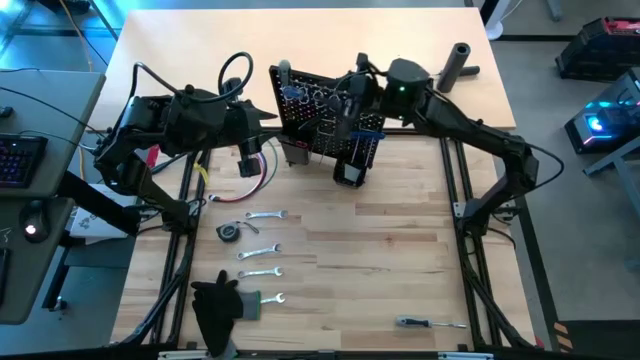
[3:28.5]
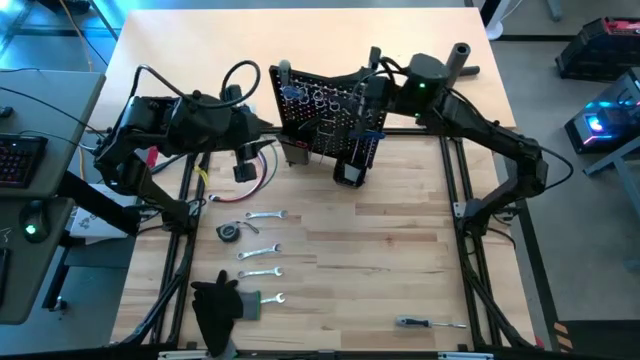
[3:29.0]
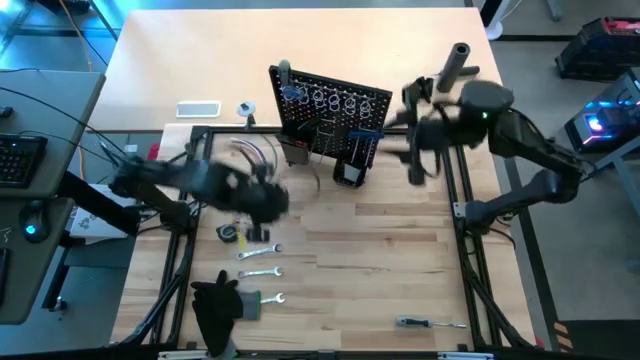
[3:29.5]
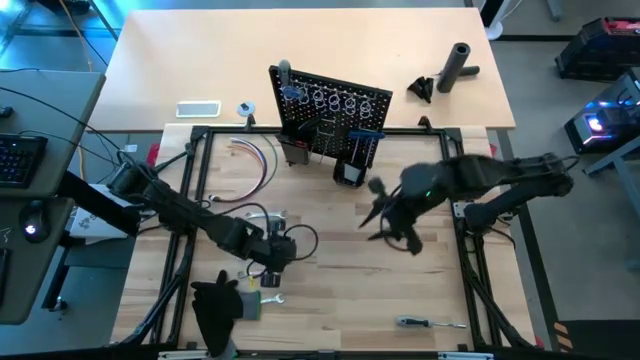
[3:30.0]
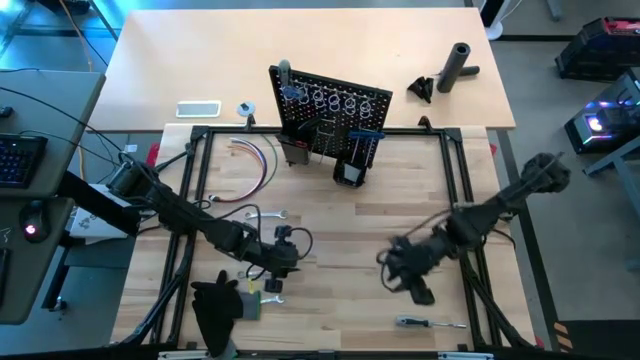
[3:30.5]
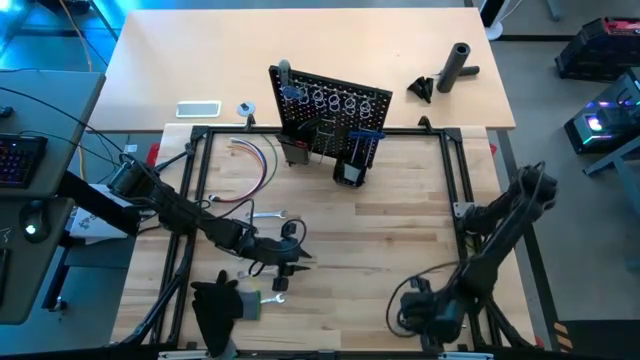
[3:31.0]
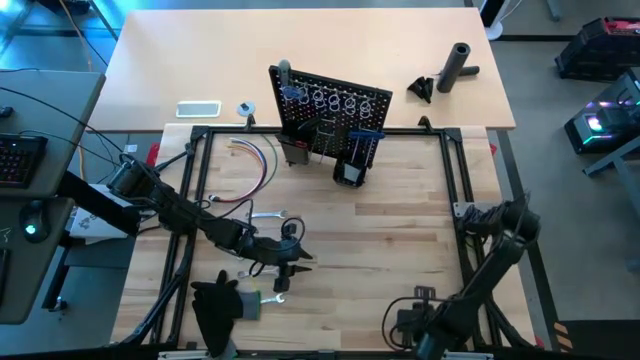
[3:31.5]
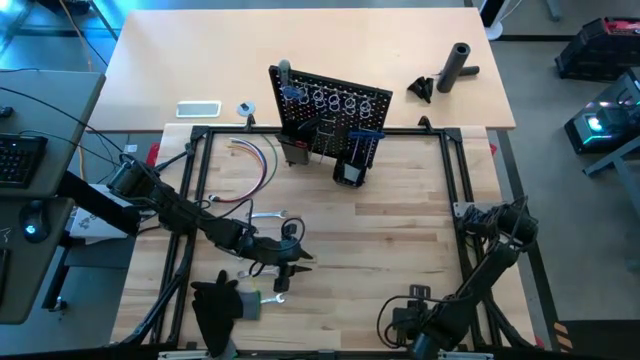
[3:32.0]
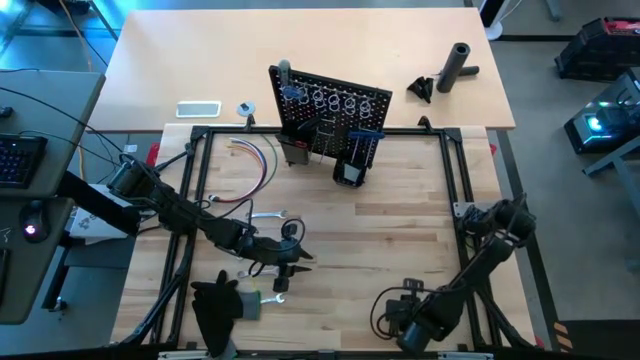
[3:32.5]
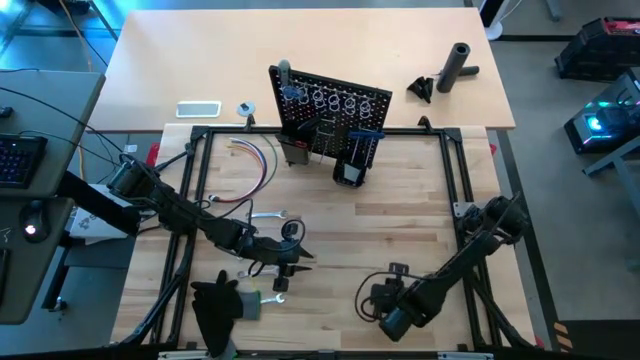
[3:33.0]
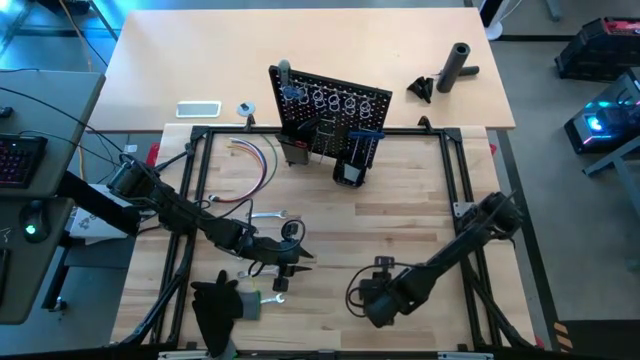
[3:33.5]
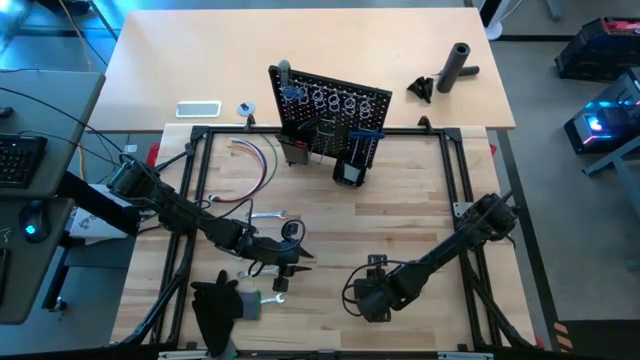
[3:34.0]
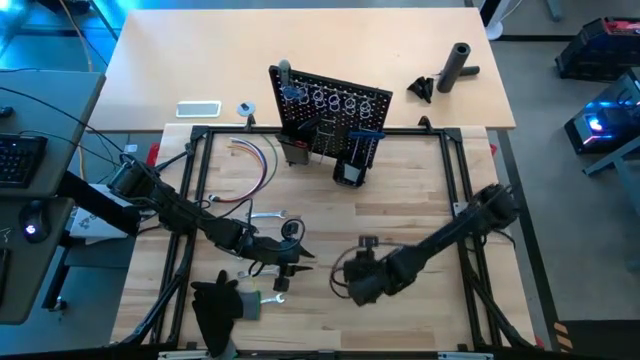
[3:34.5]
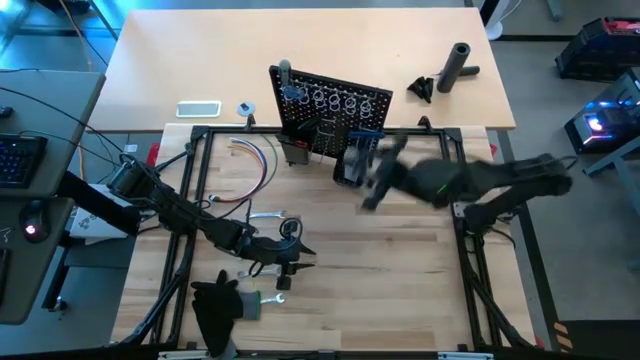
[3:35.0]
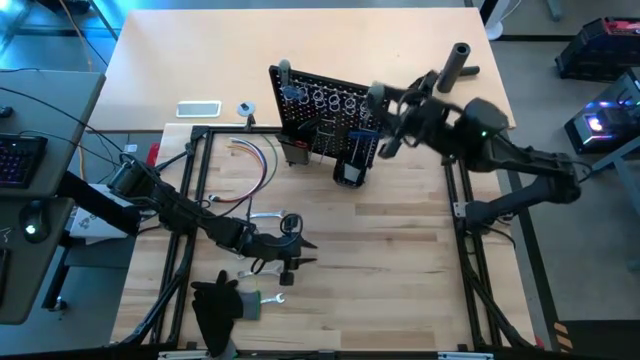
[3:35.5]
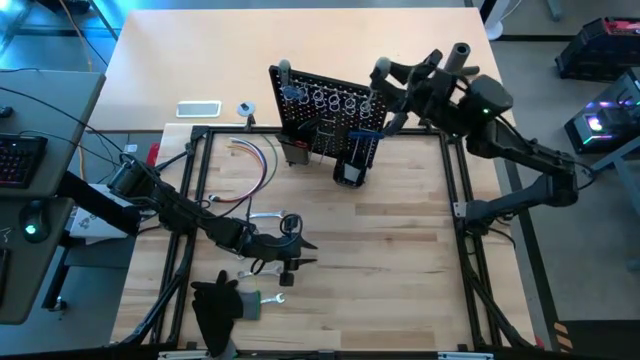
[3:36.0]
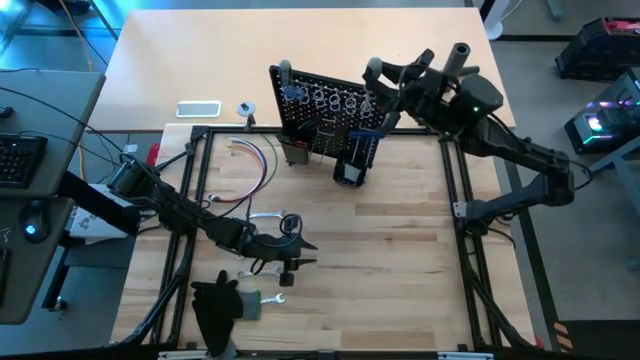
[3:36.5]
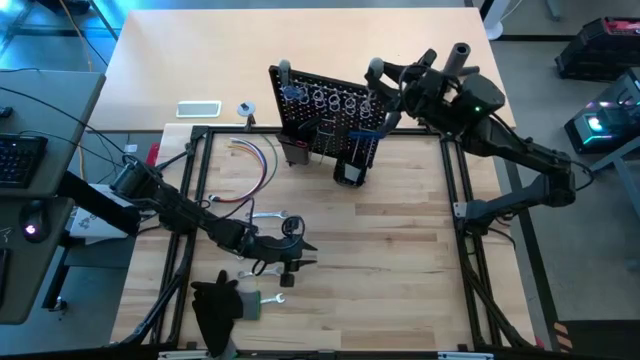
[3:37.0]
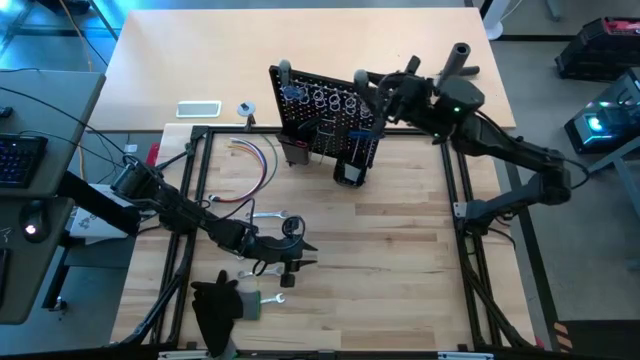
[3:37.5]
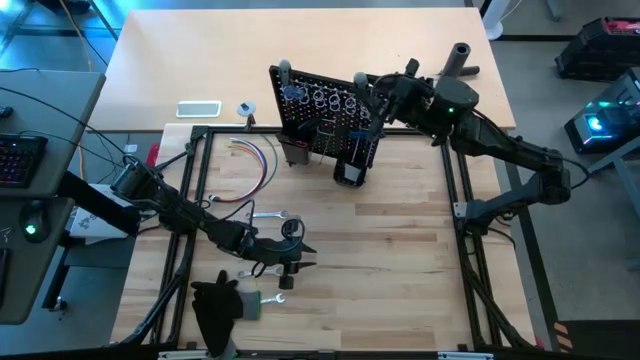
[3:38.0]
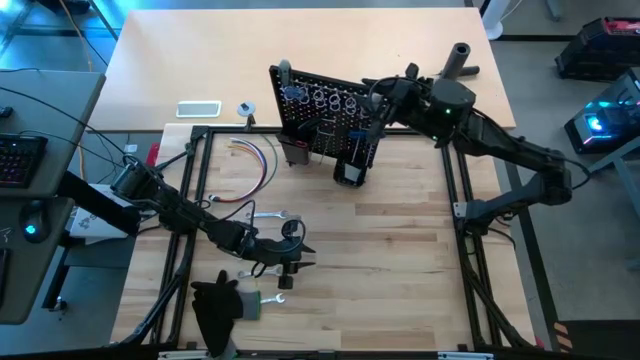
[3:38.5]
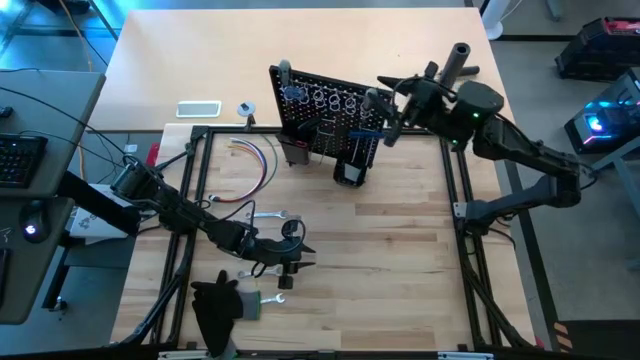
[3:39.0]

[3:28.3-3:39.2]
Task: Hang tools onto peg board
Hang the gray screwdriver on the black pegboard

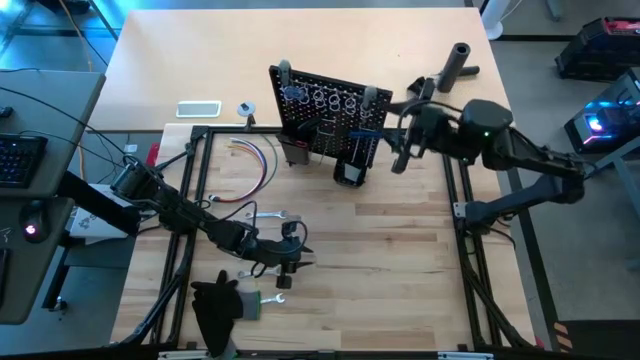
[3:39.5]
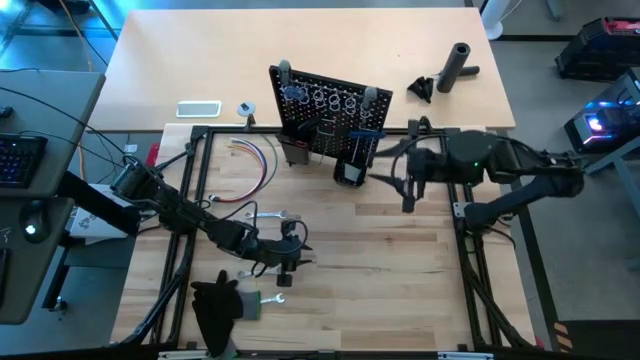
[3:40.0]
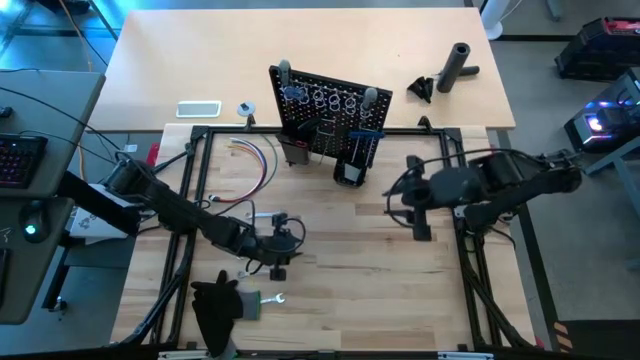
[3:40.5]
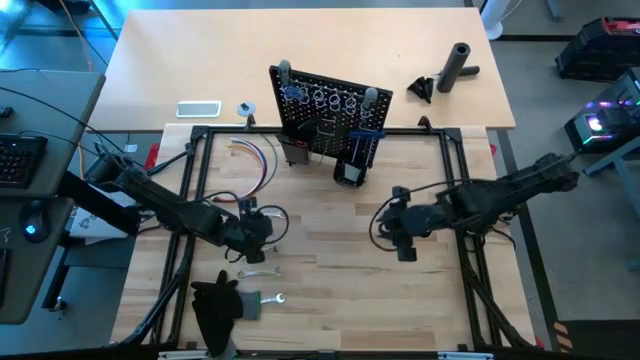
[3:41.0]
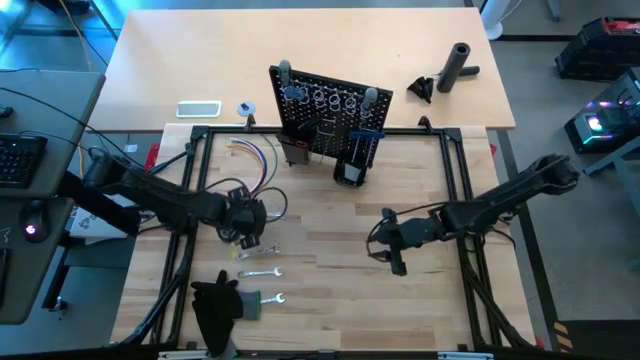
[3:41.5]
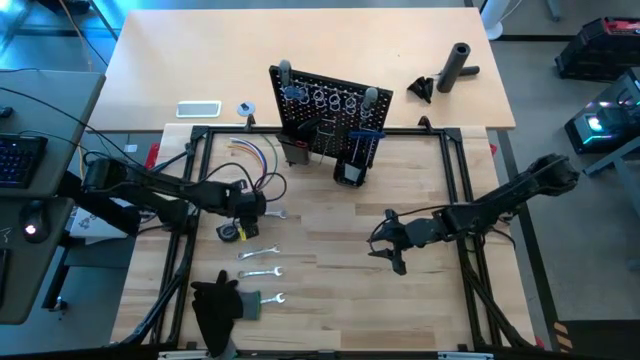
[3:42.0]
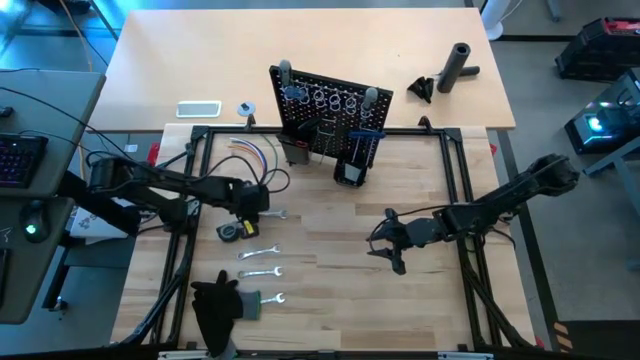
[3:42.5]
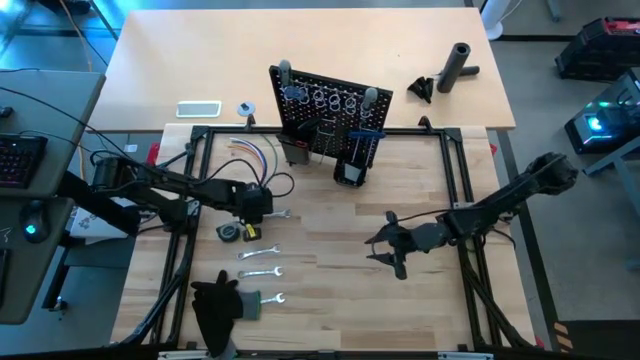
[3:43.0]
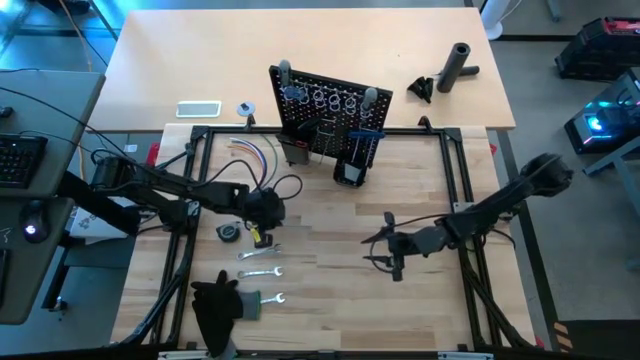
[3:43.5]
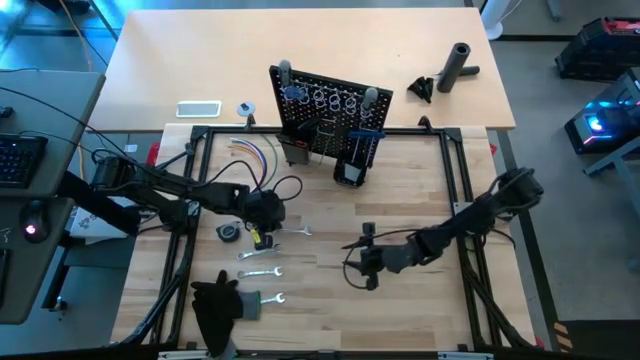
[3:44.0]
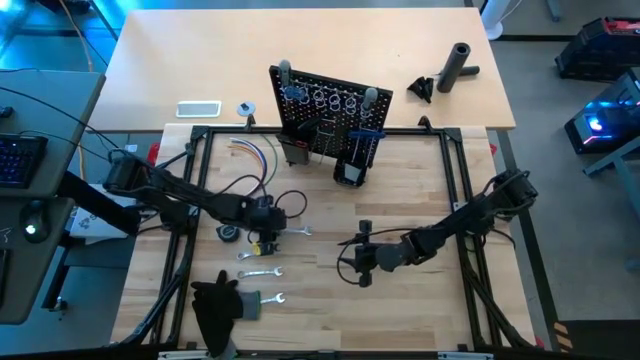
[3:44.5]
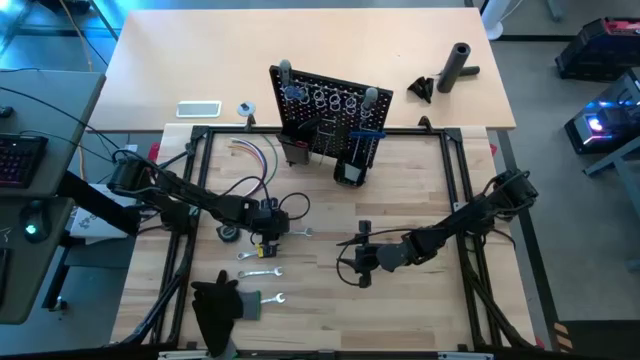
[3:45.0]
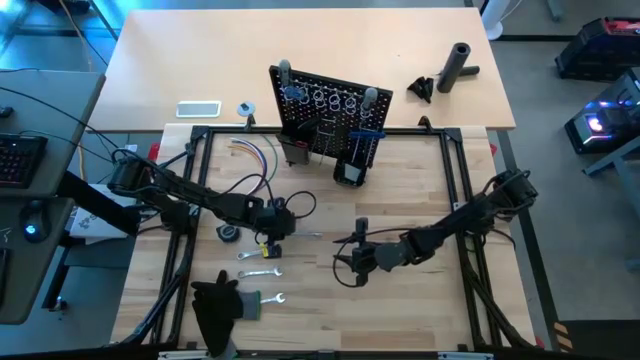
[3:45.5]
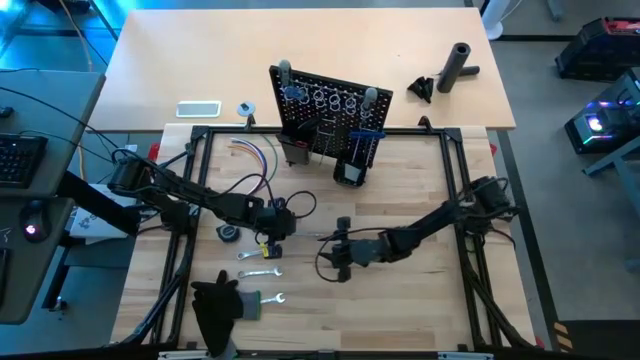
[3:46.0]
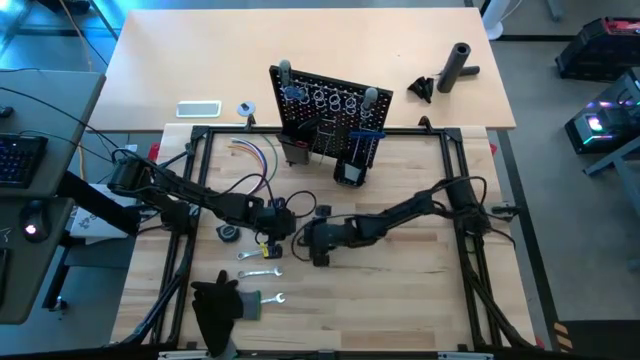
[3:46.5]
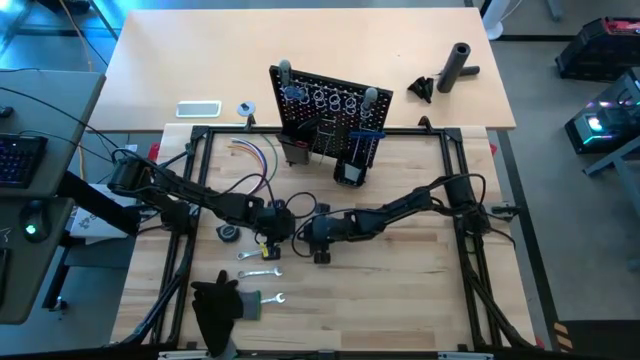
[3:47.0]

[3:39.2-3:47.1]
Hang the wrench on the black pegboard

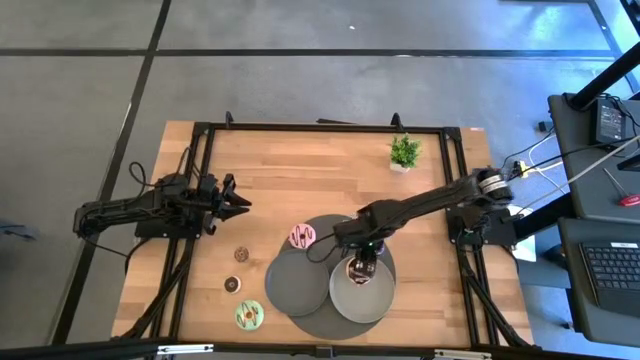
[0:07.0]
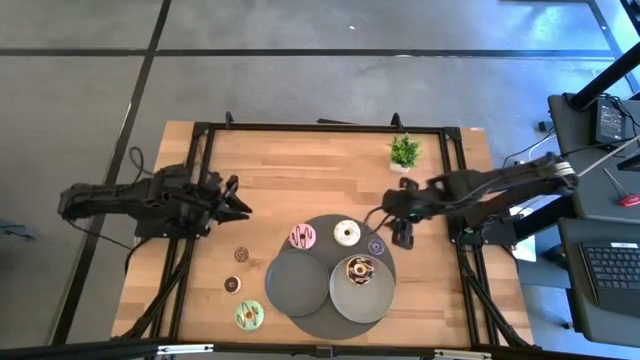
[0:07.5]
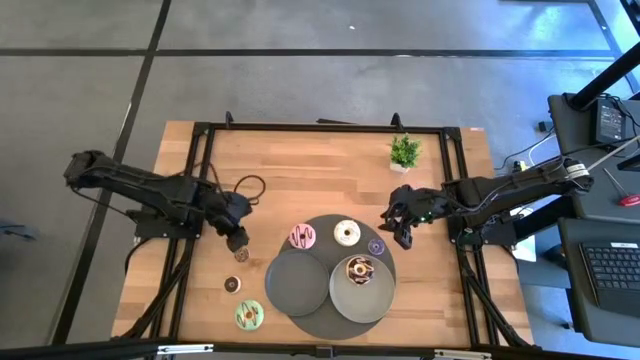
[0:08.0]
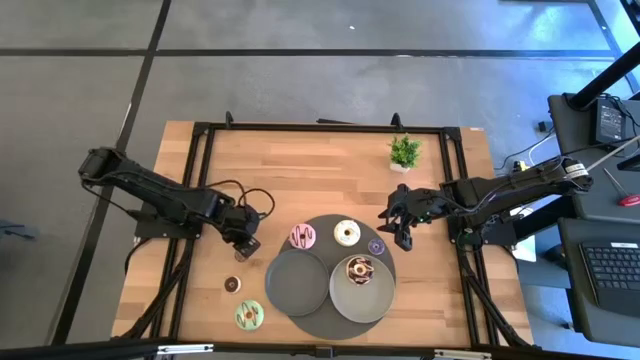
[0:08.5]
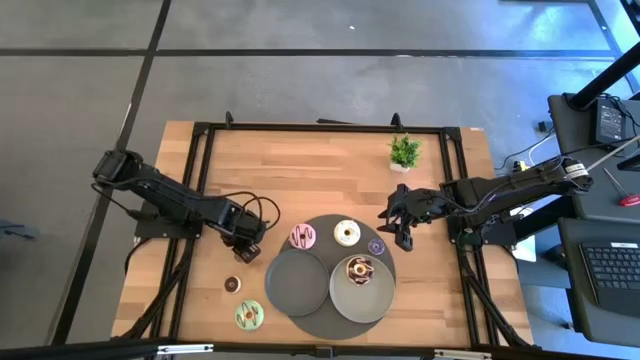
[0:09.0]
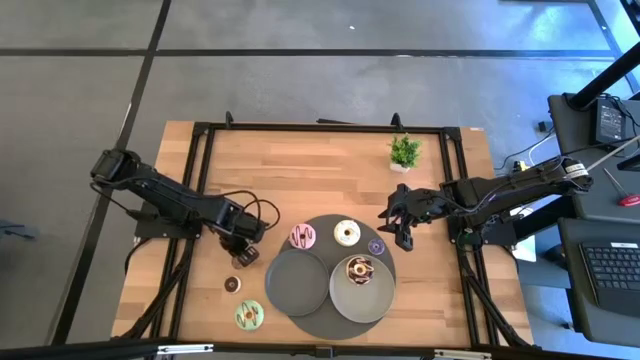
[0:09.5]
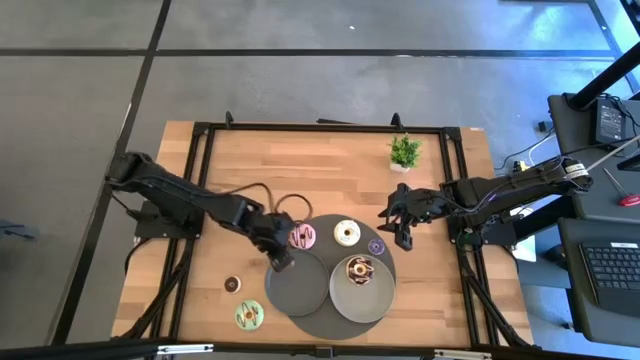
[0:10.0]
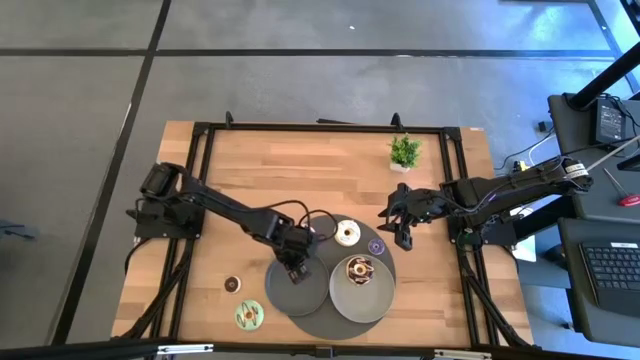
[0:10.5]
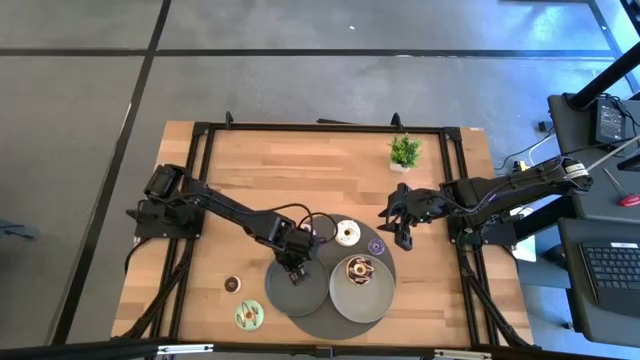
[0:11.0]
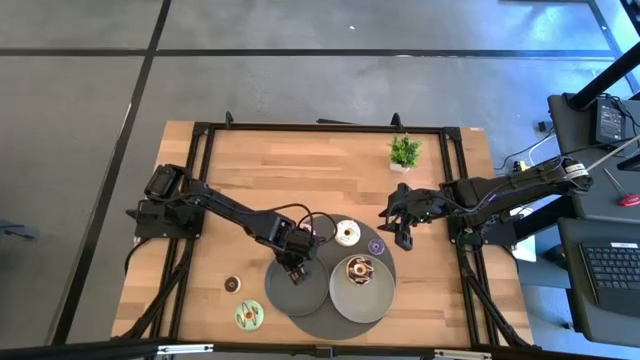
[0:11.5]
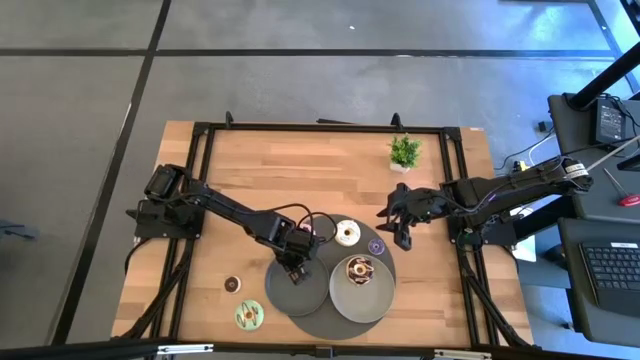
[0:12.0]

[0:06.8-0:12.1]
Task: Pick & Place donuts
Put the small brown donut on the black plate
